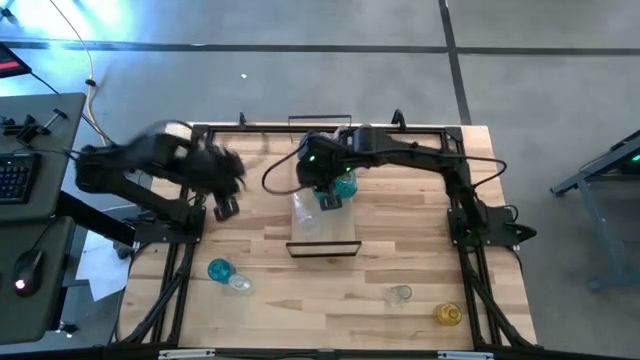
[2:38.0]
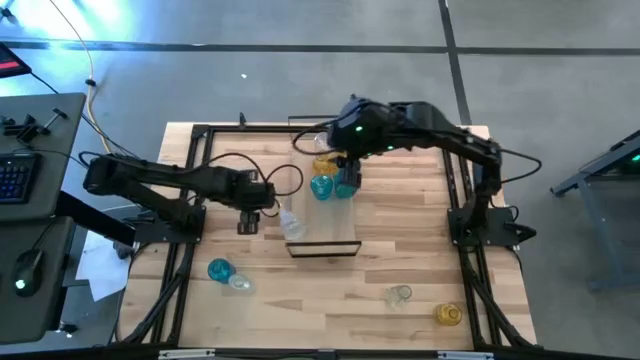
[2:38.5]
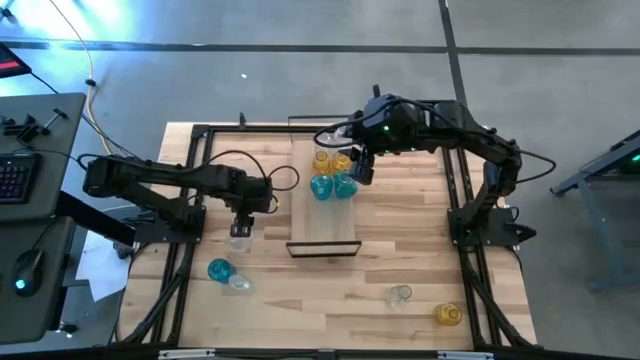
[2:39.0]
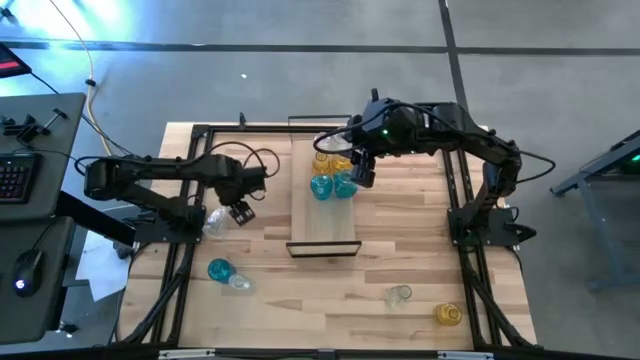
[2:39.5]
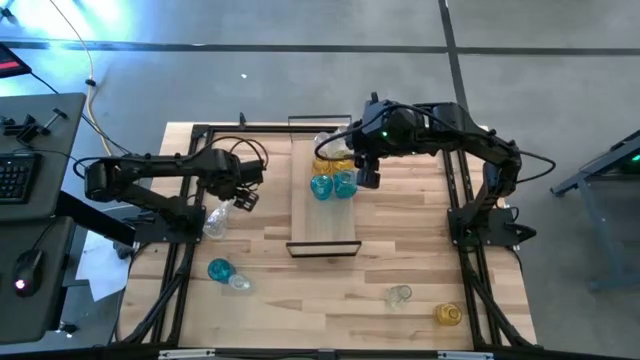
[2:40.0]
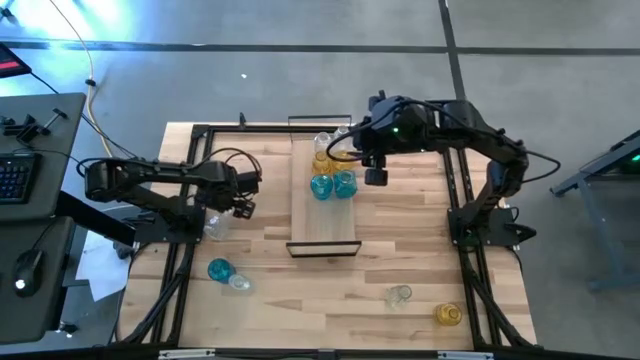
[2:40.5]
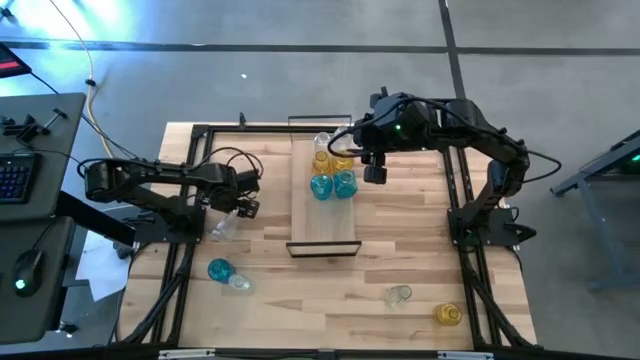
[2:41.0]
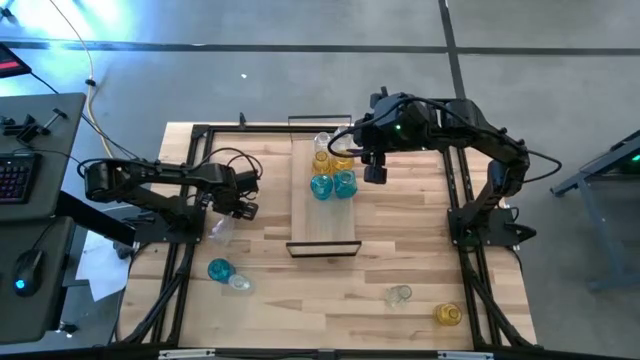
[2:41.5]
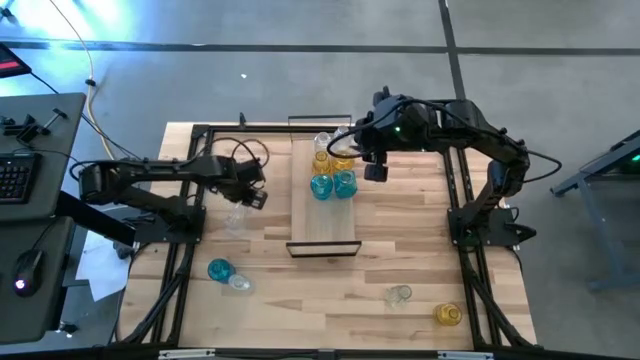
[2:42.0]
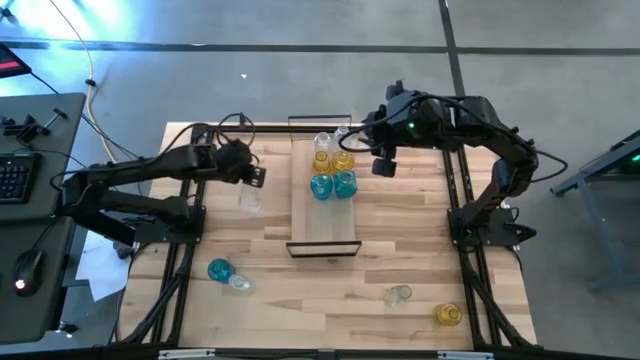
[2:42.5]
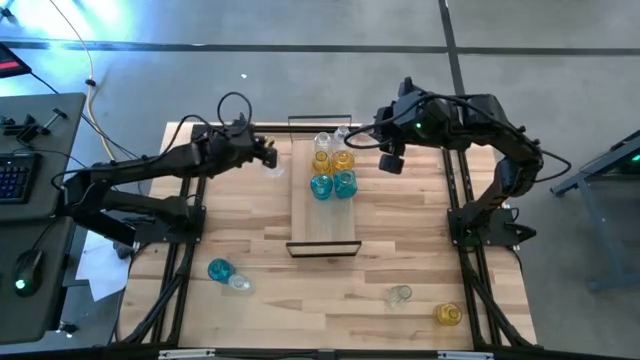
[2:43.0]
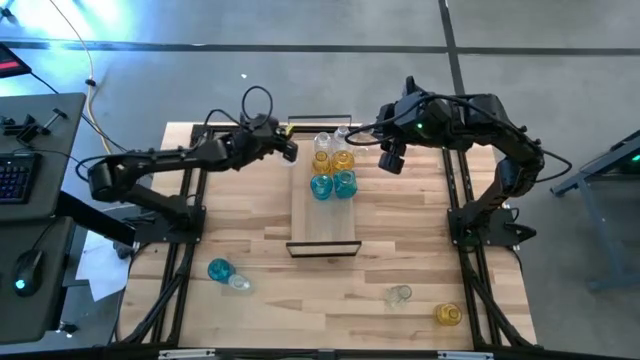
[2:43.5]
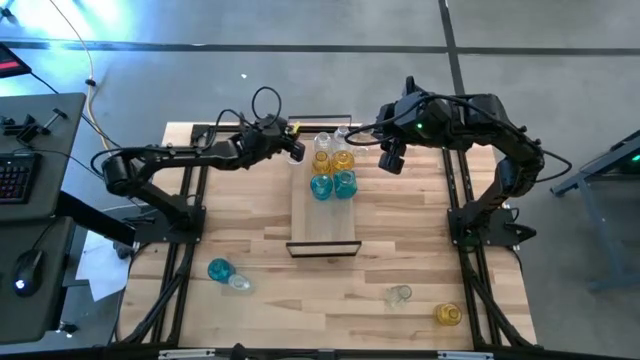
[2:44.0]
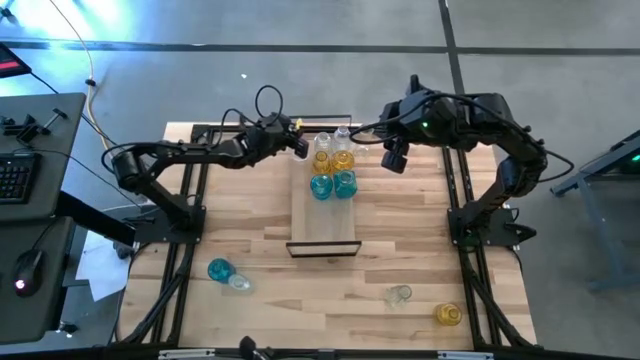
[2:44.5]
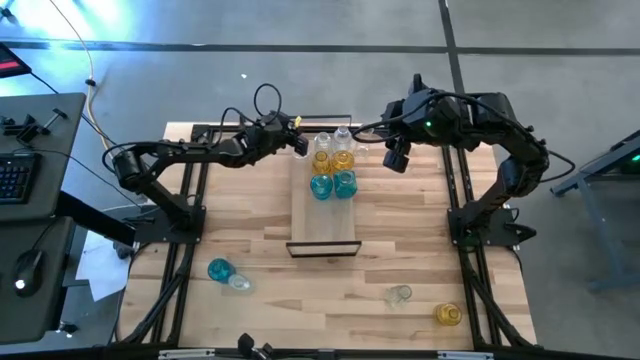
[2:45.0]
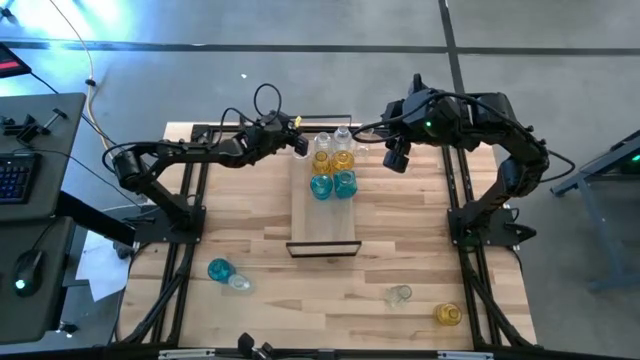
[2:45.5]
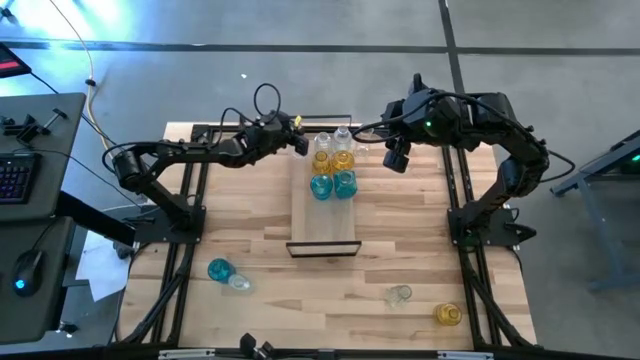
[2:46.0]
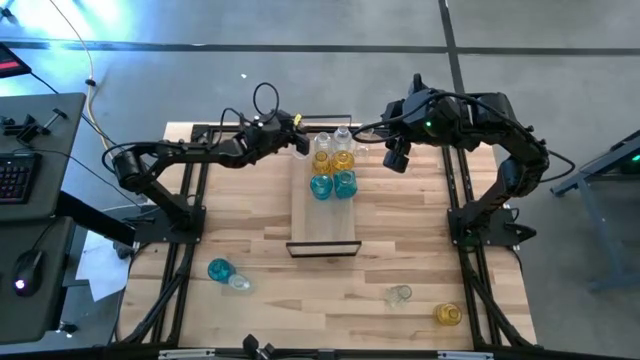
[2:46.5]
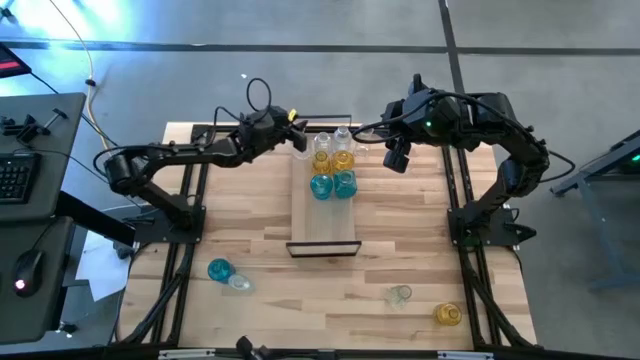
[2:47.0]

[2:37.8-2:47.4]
Task: sort vases onto shelf
Put the middle left transparent flower vase on the shelf aligned with the other transparent flower vase

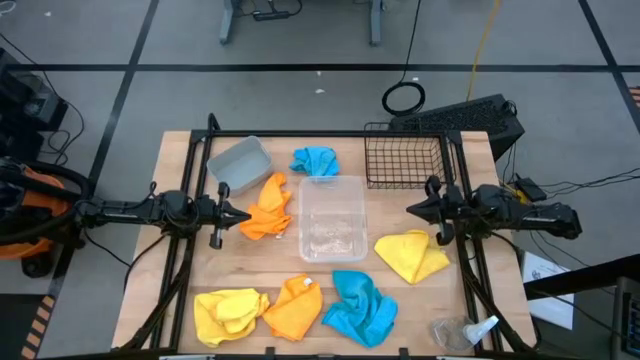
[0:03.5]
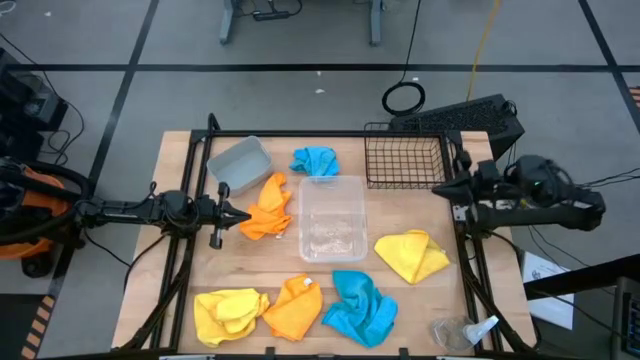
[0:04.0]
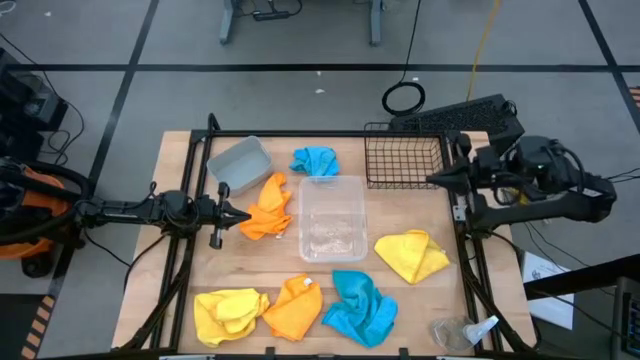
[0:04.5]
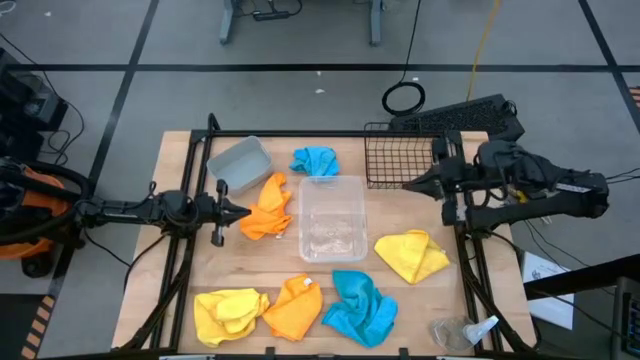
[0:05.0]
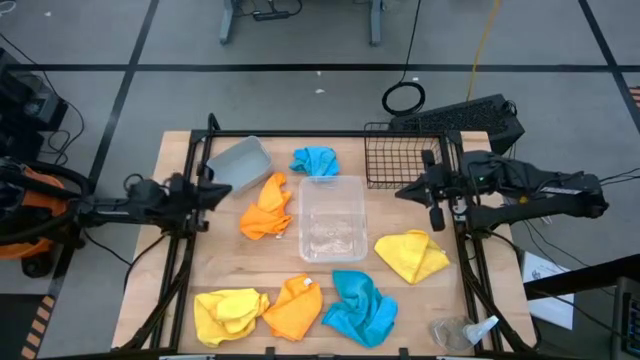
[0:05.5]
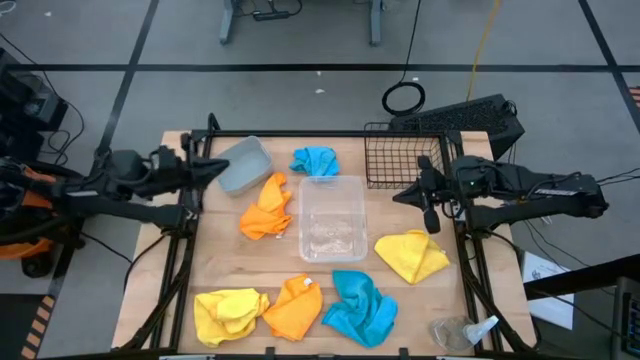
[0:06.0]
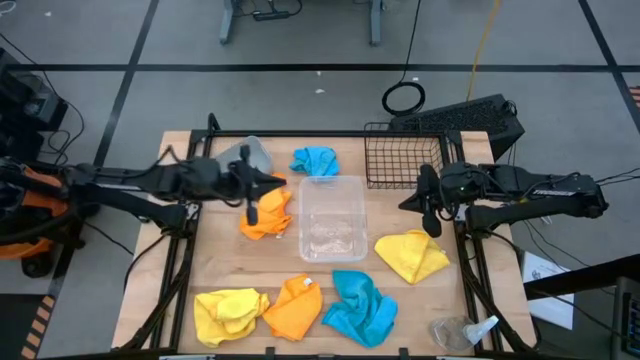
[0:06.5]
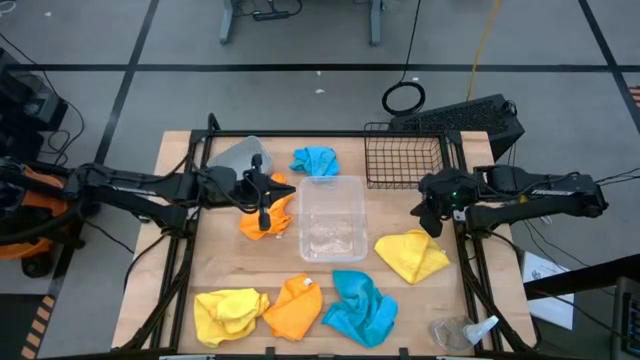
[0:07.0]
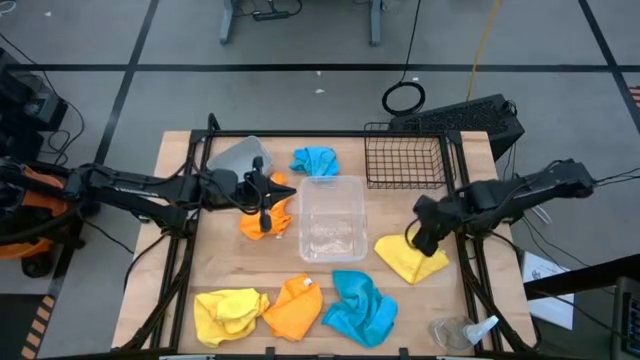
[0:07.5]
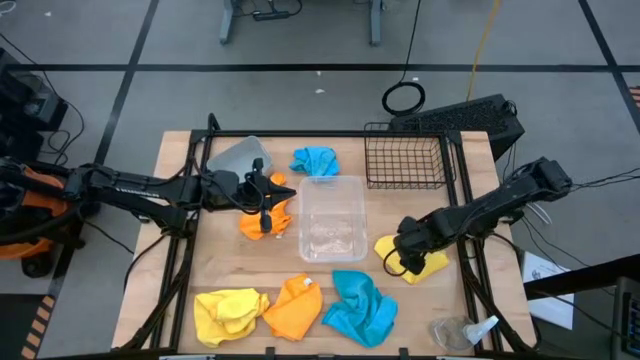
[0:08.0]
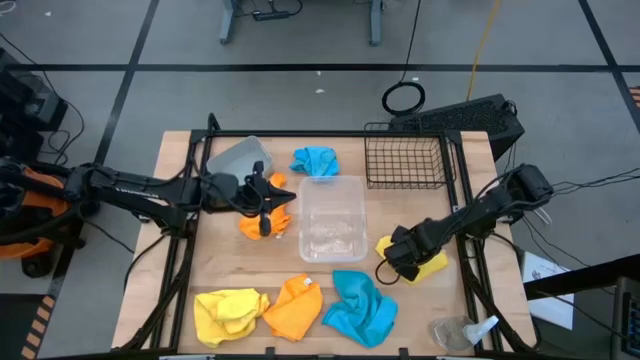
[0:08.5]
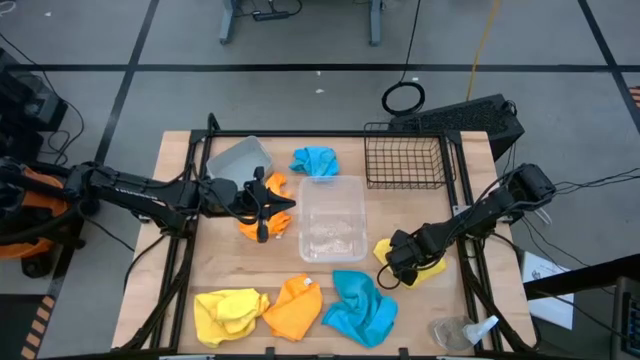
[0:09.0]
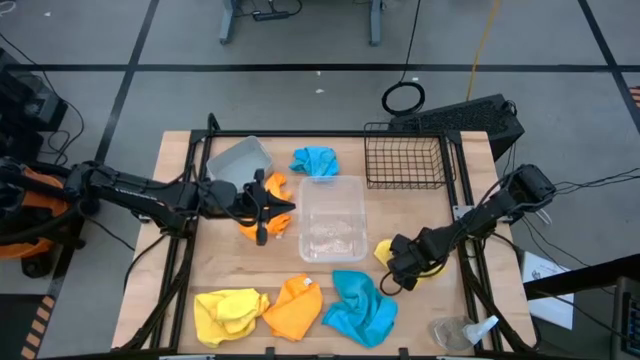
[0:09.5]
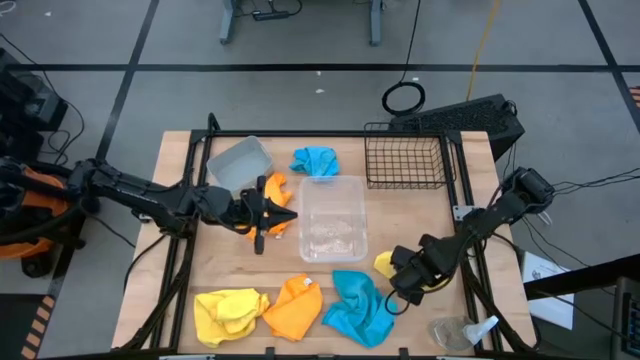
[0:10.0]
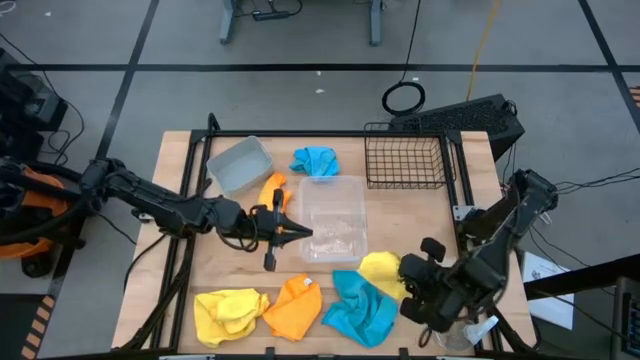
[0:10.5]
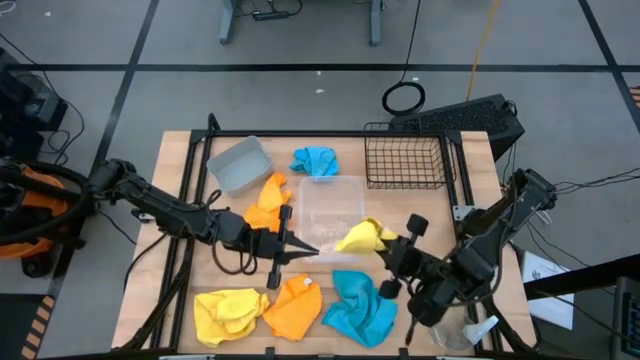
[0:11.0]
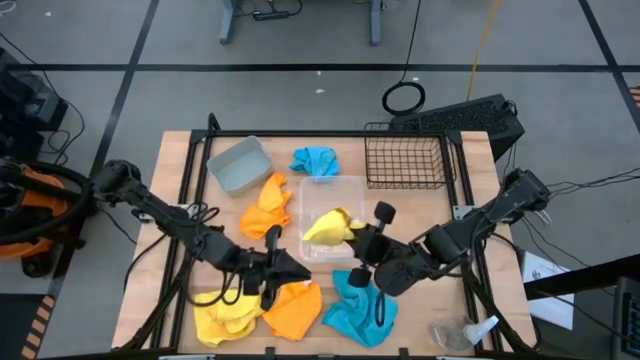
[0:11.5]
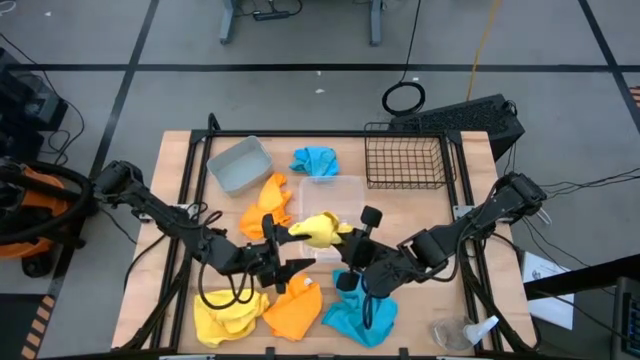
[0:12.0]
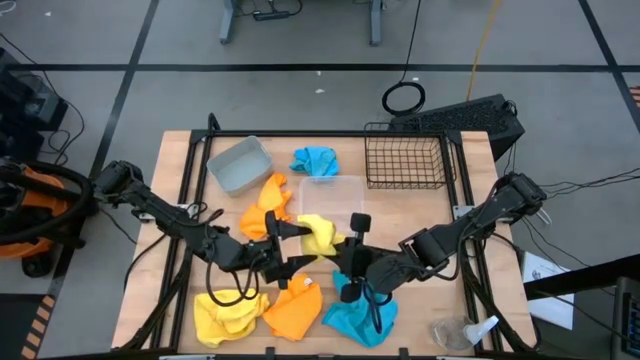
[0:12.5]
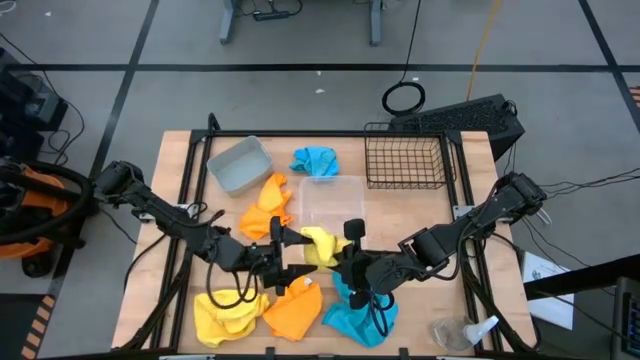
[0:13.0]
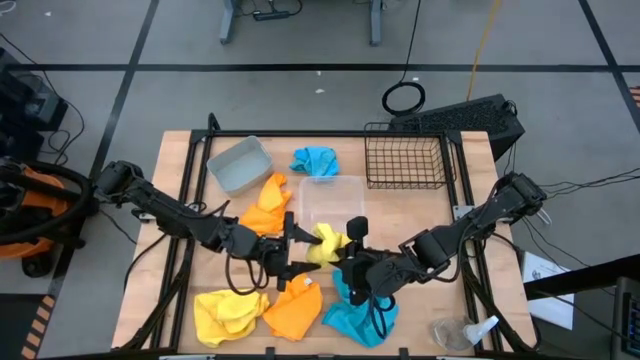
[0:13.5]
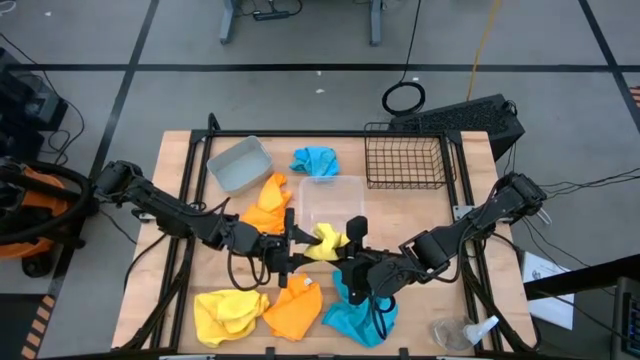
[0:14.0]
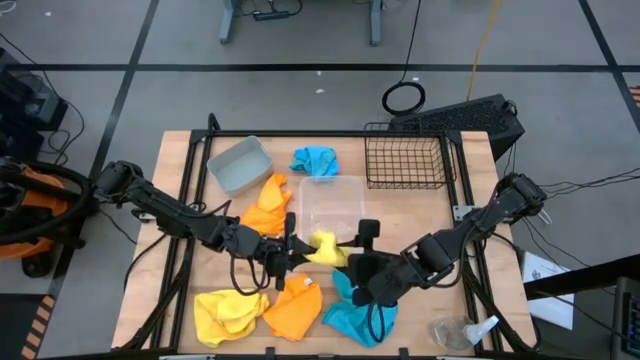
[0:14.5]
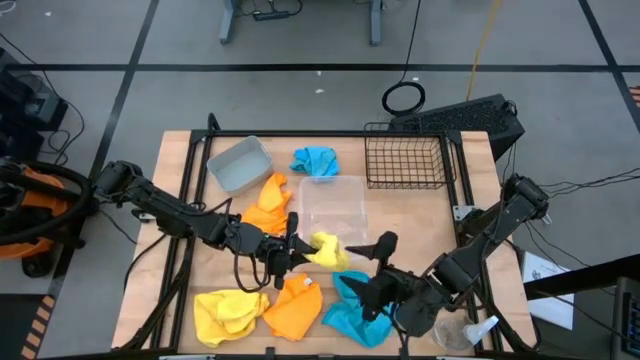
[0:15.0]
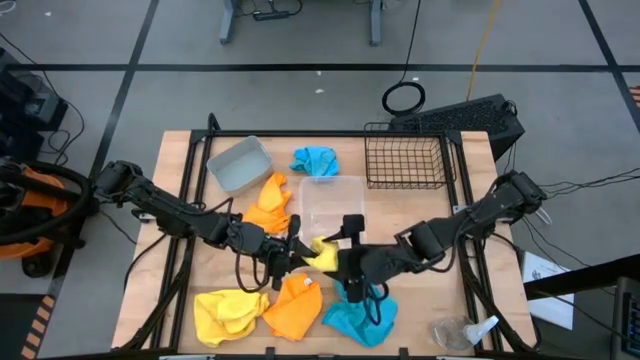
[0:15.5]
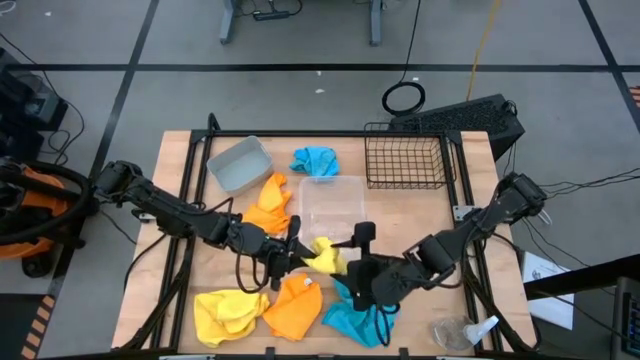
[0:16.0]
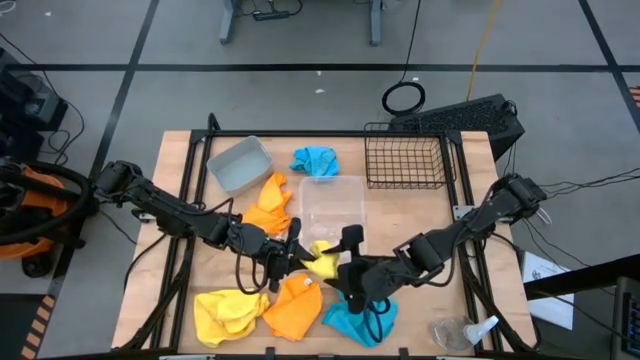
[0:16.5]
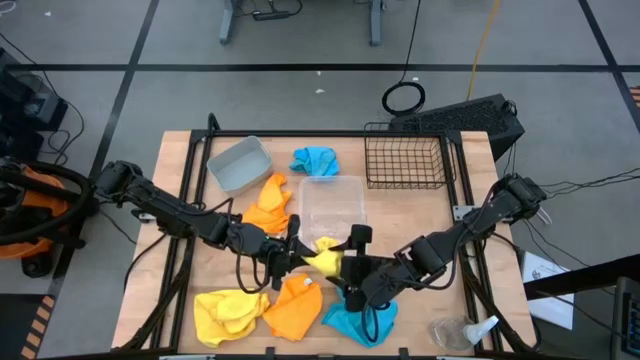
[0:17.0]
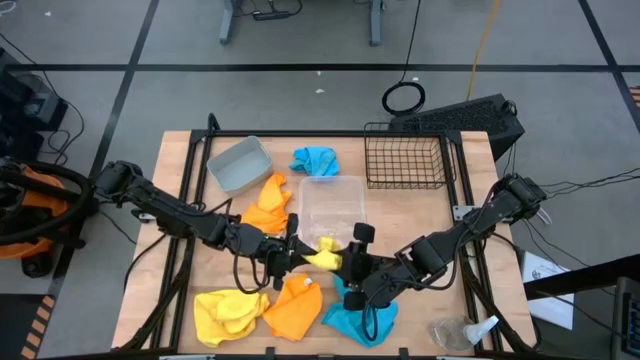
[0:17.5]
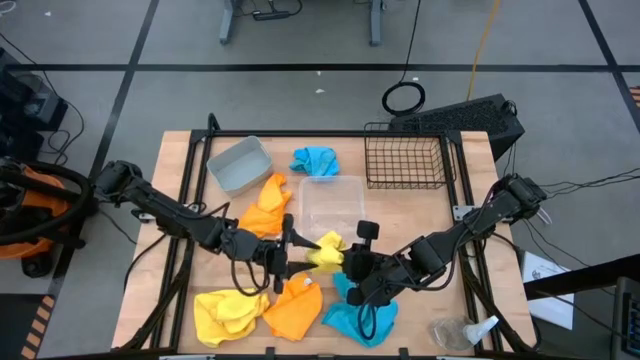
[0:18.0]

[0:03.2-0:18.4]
Task: Sort microfiber towel by color & place in baskets
Put the right yellow towel into the gray bin
